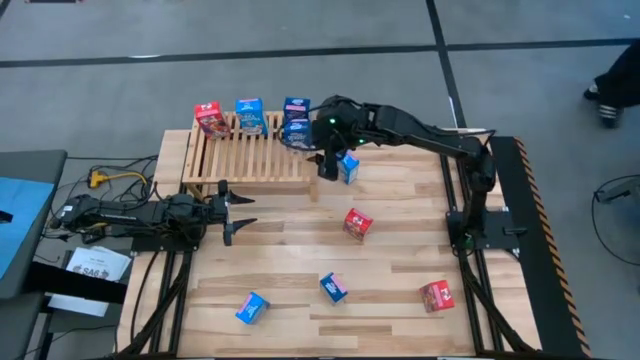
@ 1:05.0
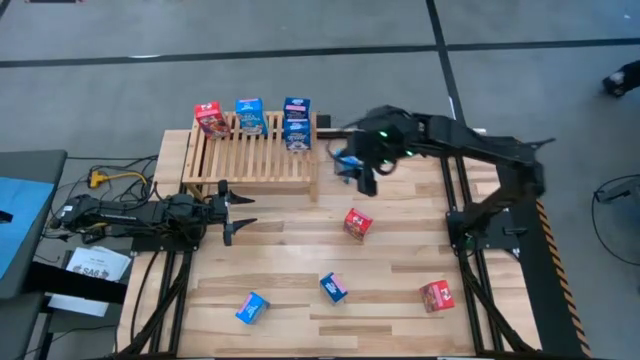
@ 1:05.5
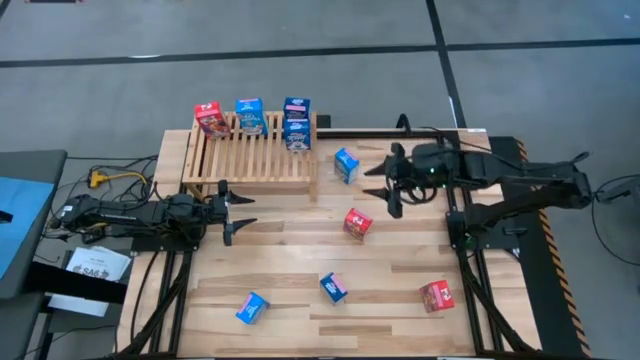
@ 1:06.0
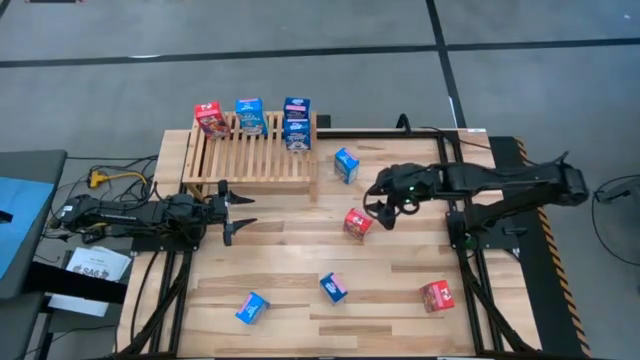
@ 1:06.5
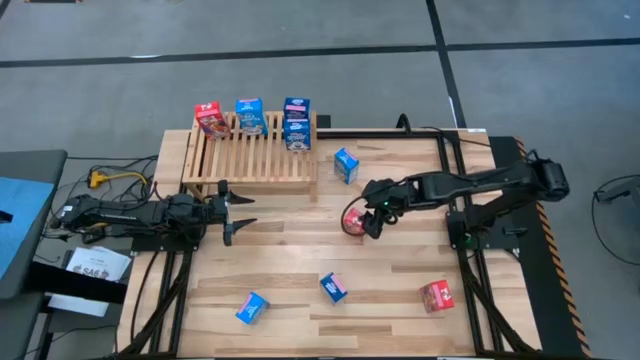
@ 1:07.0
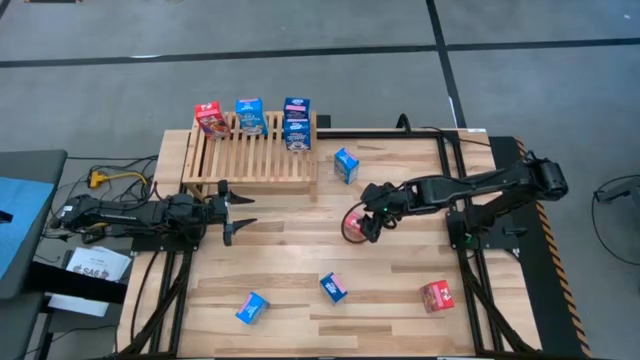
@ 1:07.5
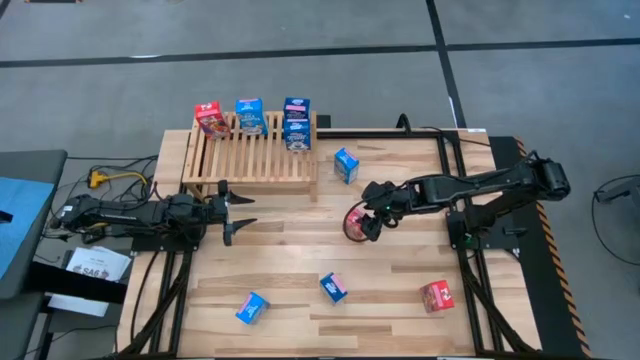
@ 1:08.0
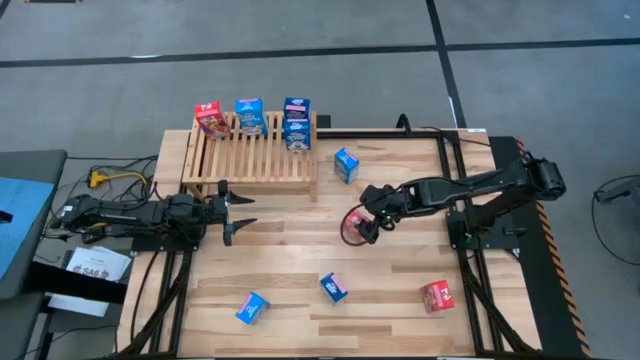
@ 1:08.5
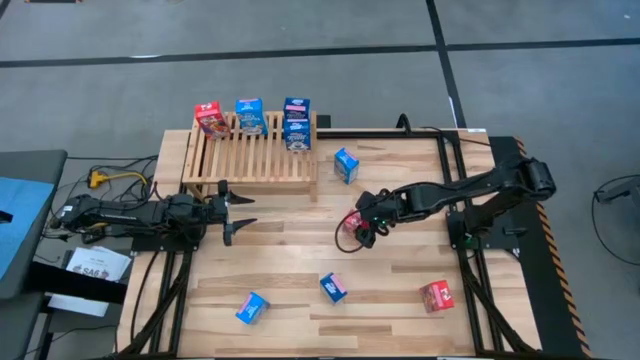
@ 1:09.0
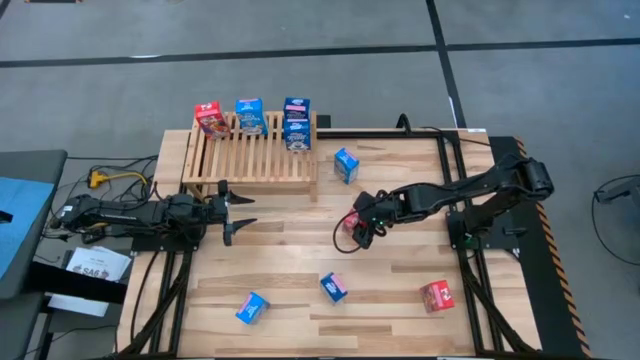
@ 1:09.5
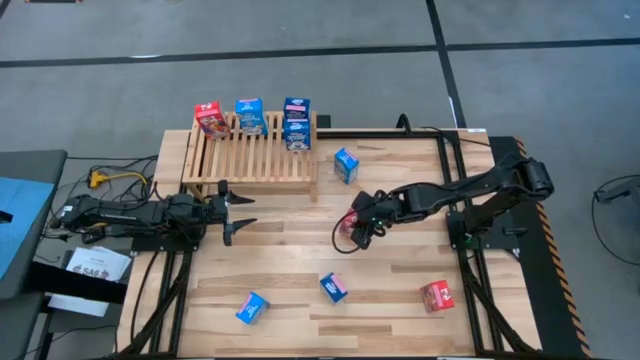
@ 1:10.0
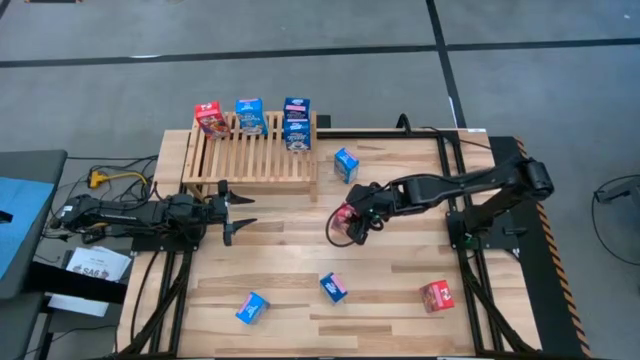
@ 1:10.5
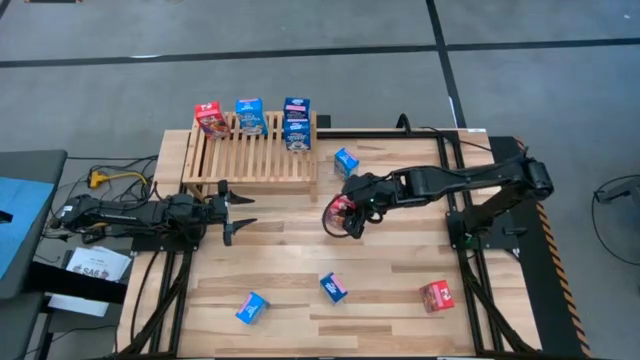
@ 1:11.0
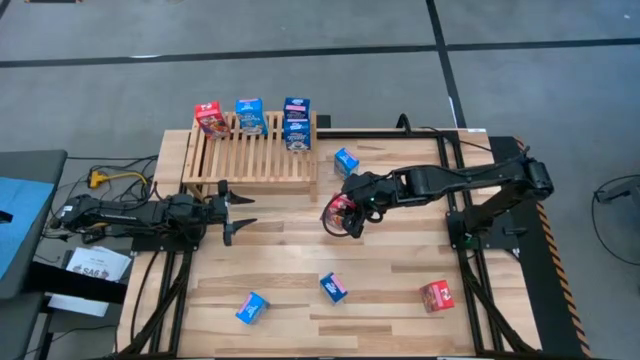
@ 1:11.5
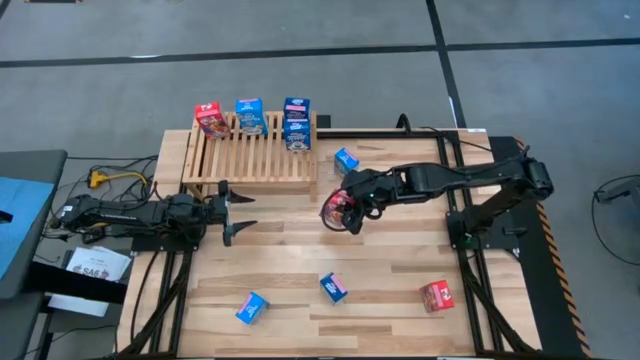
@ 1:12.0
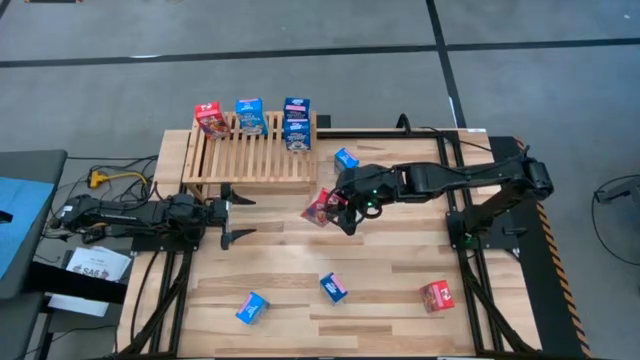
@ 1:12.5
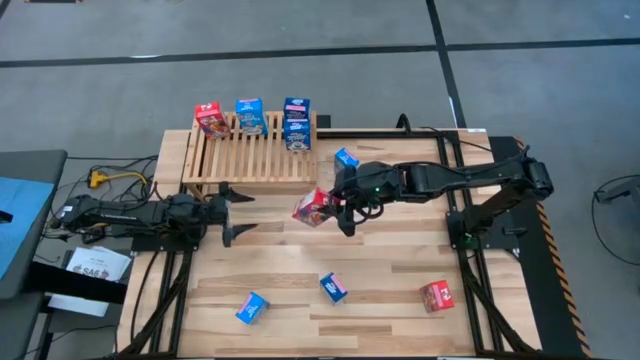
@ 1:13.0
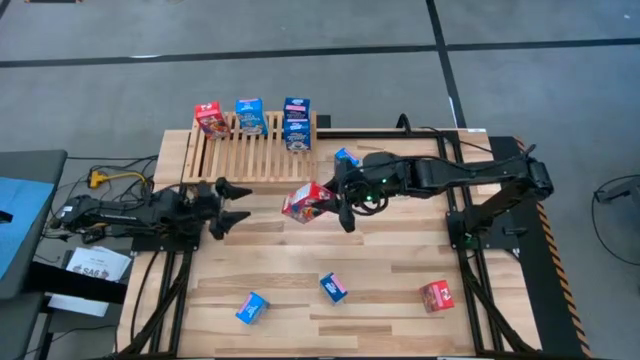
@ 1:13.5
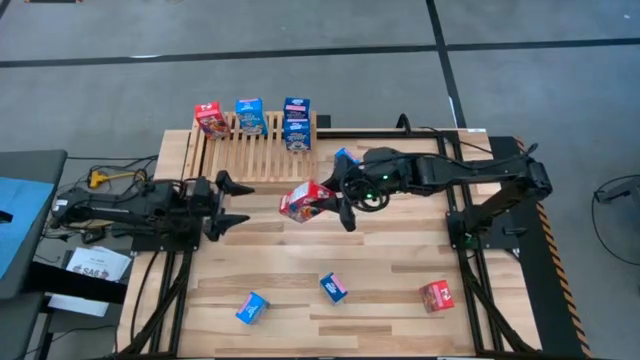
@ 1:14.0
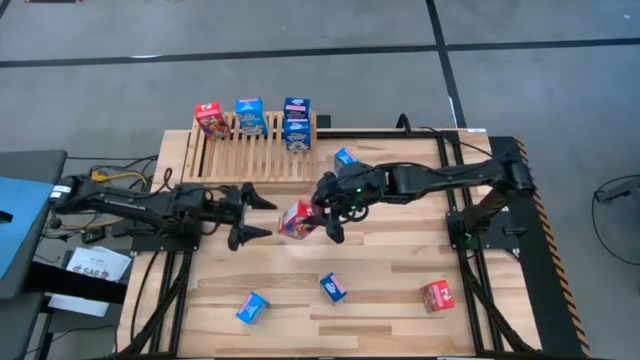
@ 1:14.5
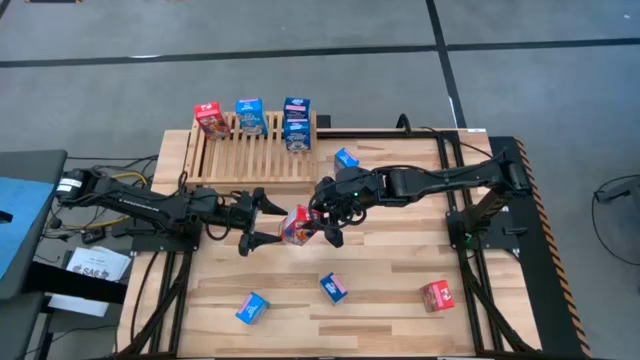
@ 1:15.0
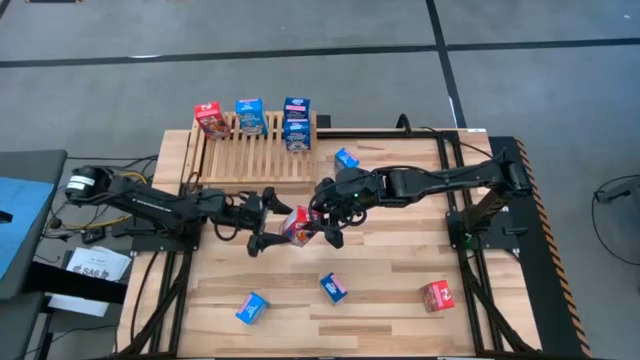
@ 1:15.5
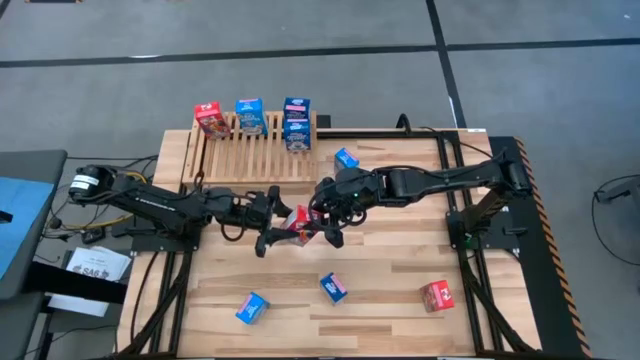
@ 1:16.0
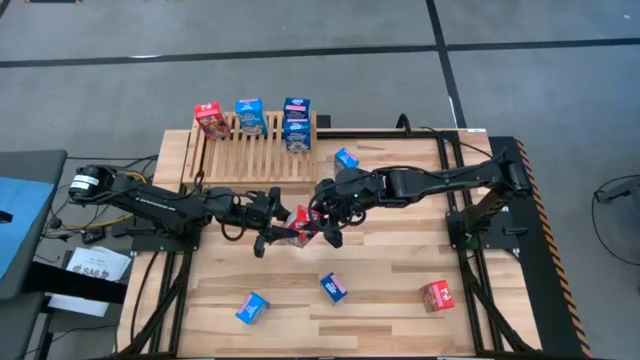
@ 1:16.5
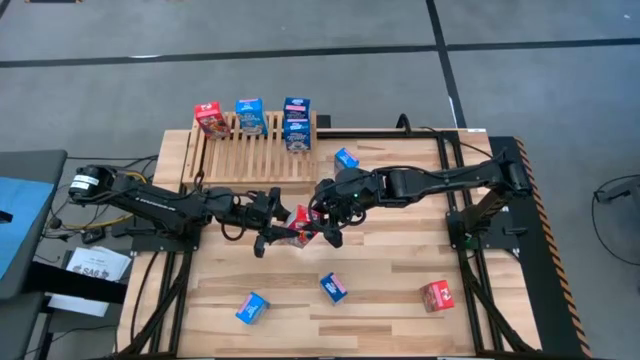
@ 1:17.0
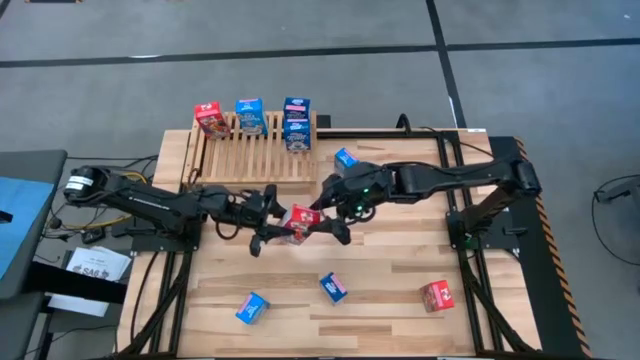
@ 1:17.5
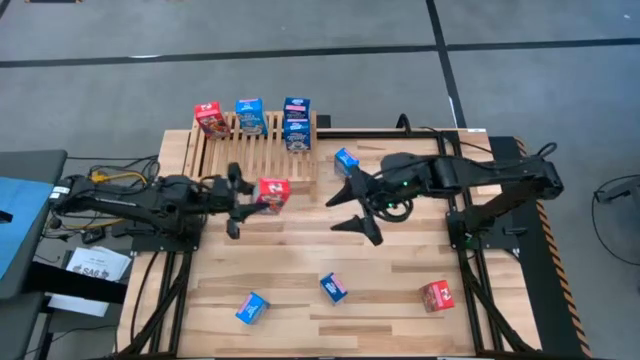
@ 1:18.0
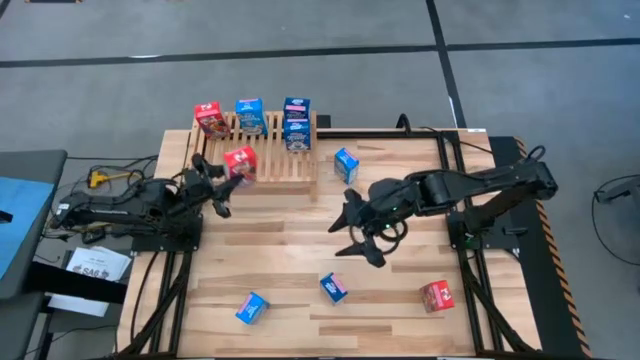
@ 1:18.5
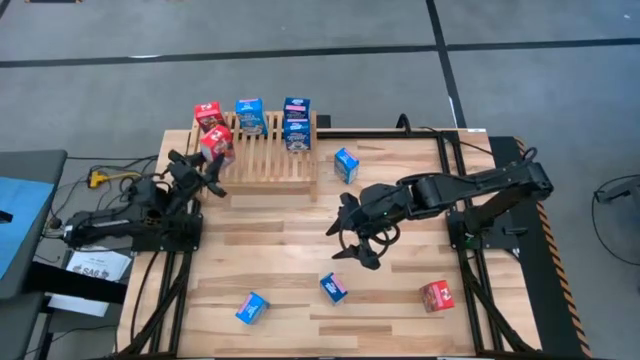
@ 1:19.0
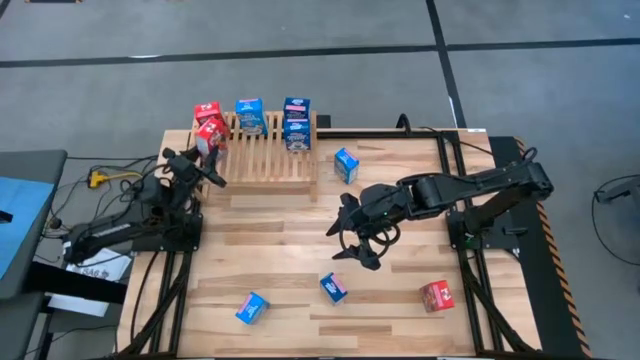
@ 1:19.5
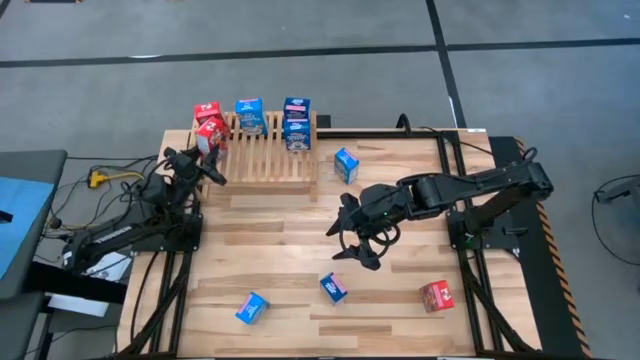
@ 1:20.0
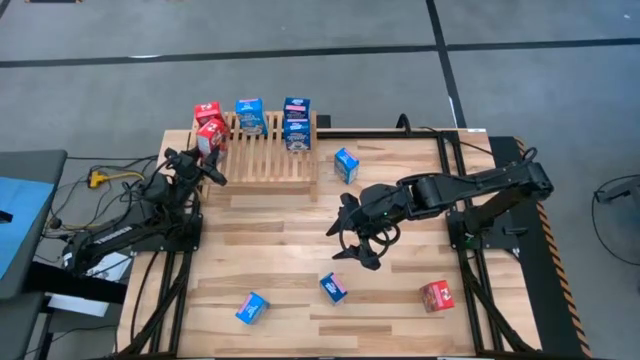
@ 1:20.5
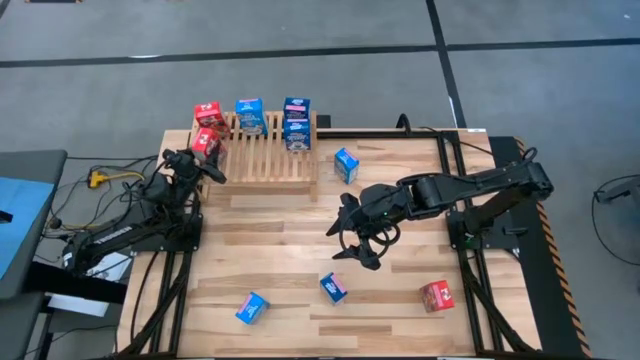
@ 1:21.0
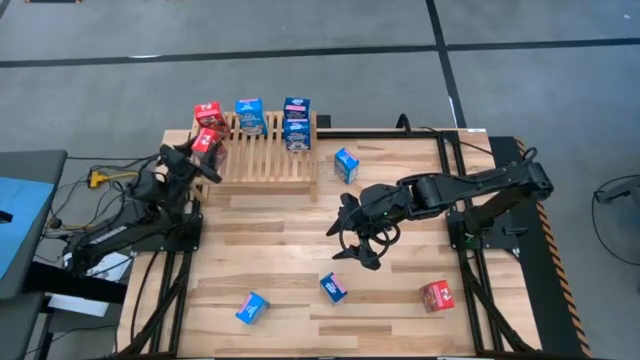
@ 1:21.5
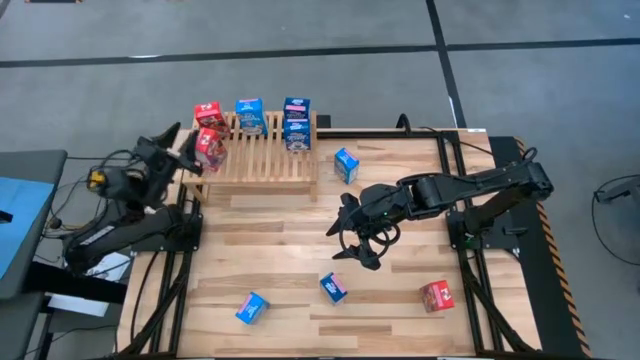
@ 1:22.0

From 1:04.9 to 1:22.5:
Task: Stack cereal on shelf
Put the top red cereal box the aligned with the other red cereal box on the shelf
